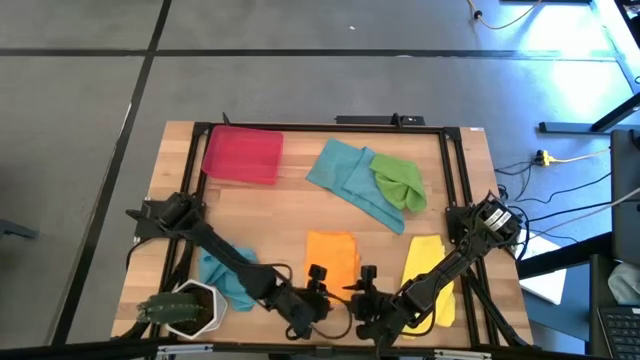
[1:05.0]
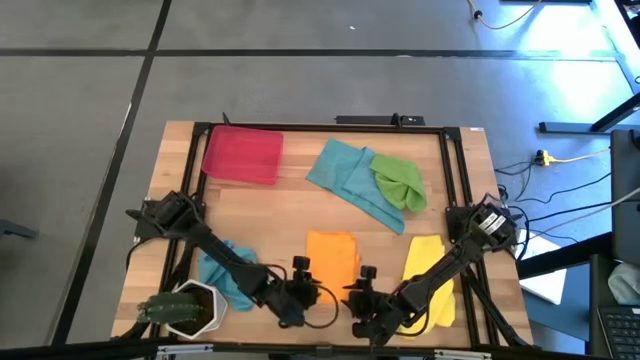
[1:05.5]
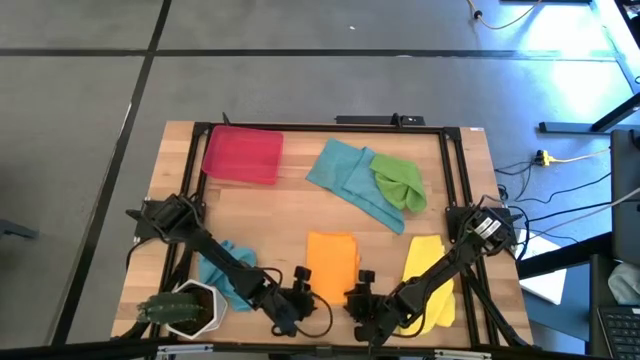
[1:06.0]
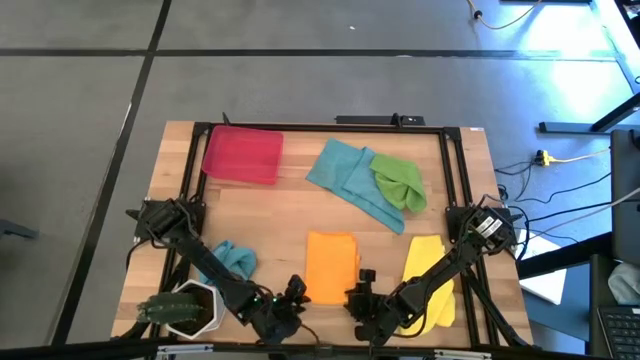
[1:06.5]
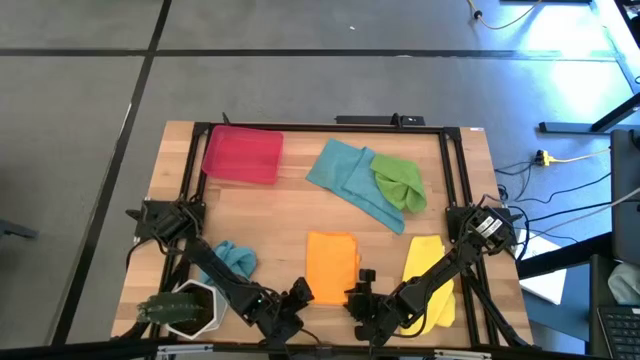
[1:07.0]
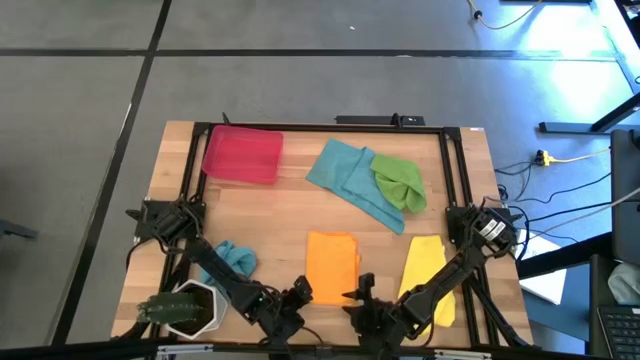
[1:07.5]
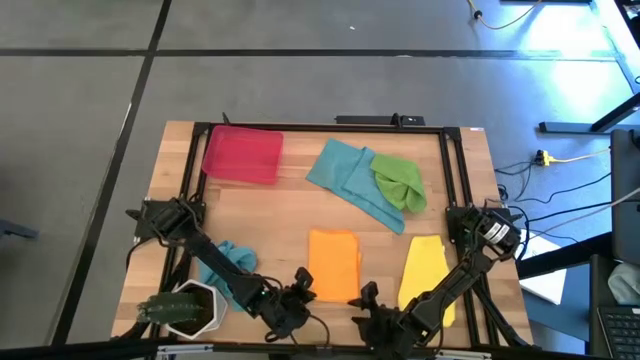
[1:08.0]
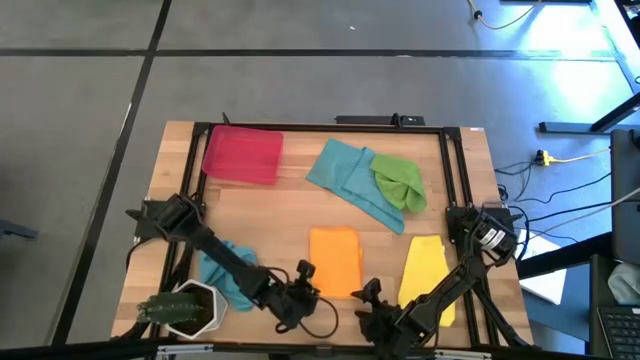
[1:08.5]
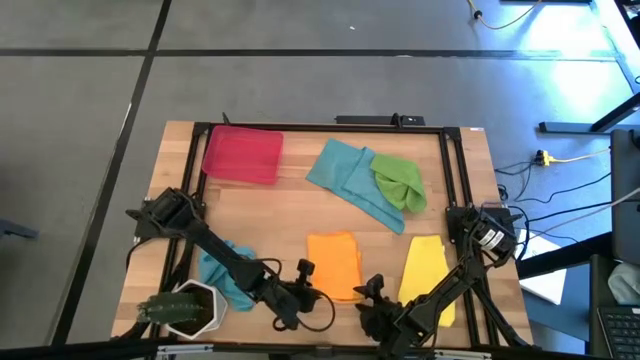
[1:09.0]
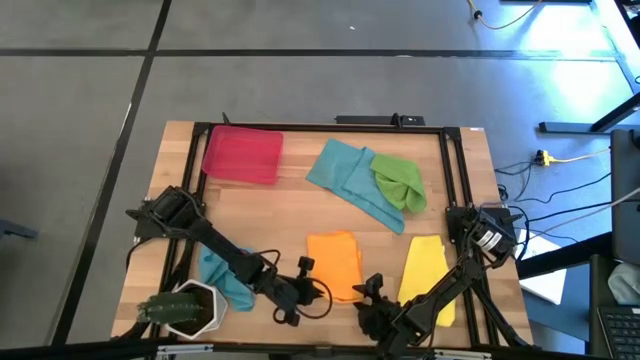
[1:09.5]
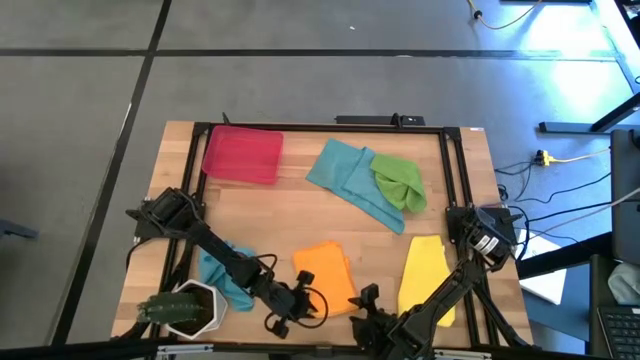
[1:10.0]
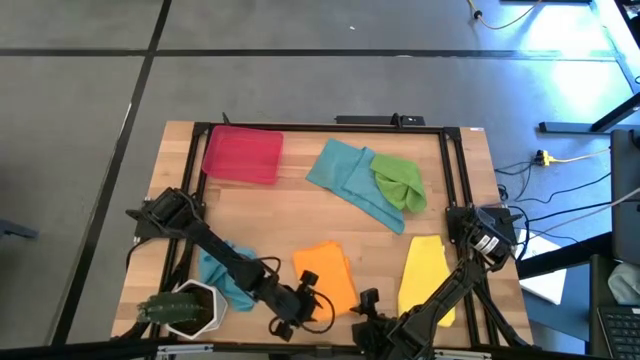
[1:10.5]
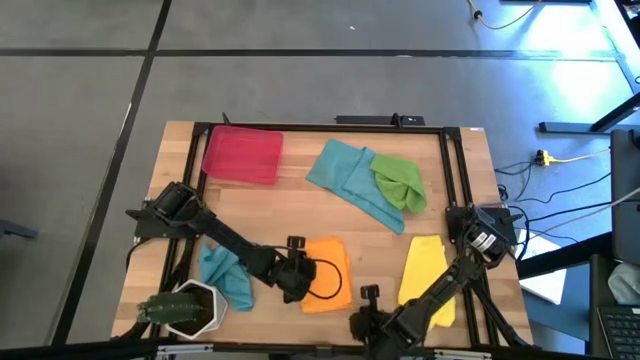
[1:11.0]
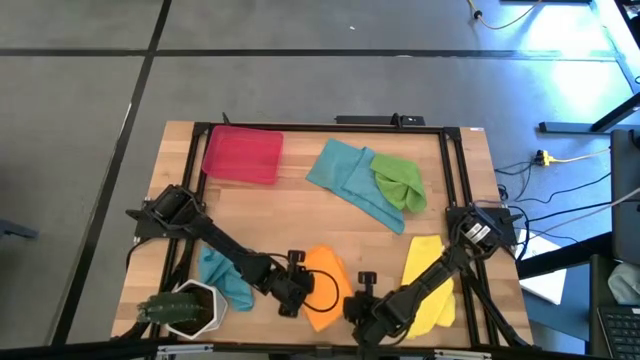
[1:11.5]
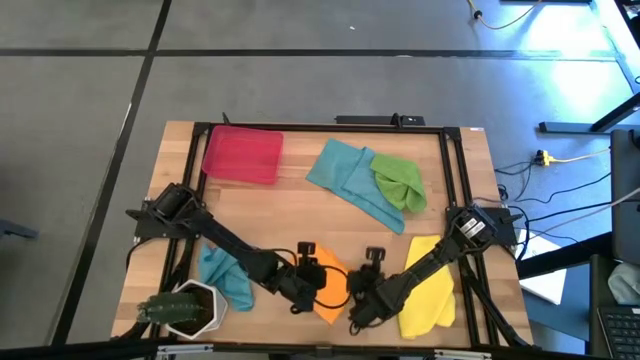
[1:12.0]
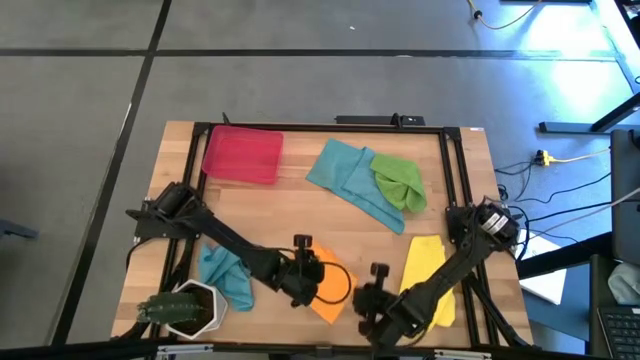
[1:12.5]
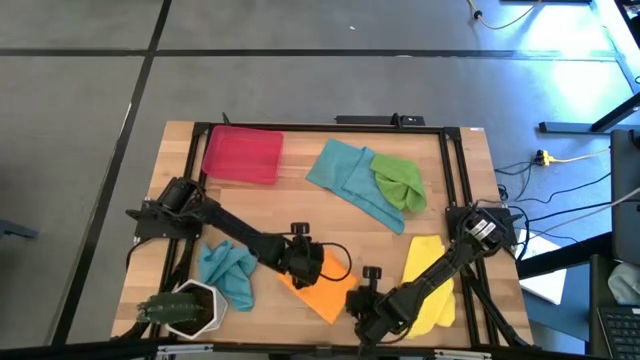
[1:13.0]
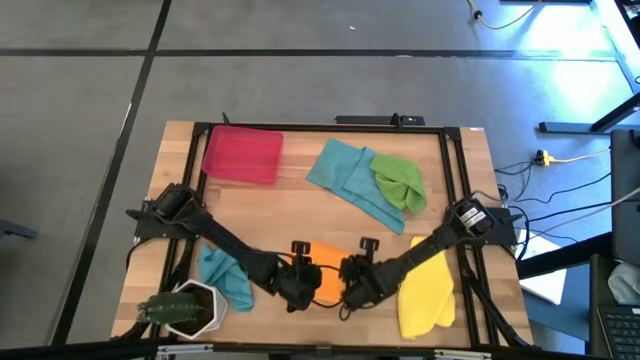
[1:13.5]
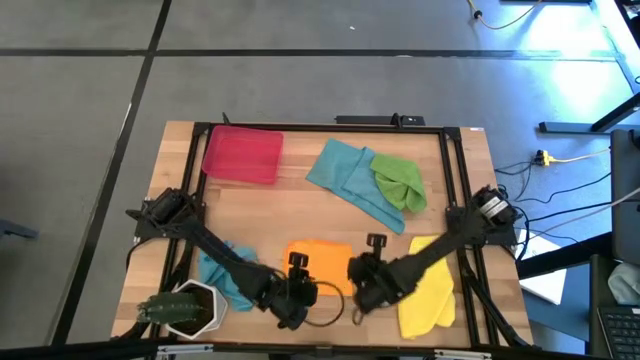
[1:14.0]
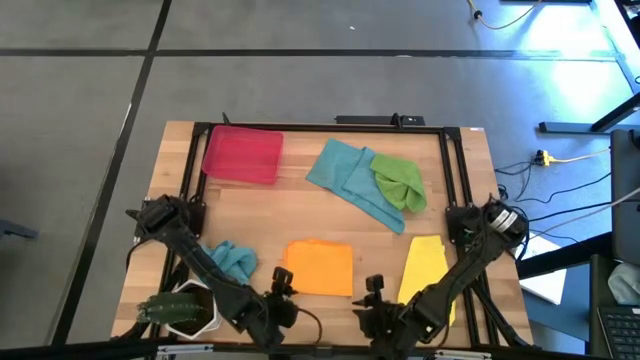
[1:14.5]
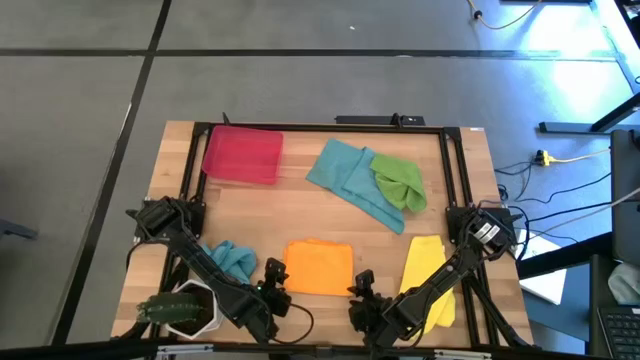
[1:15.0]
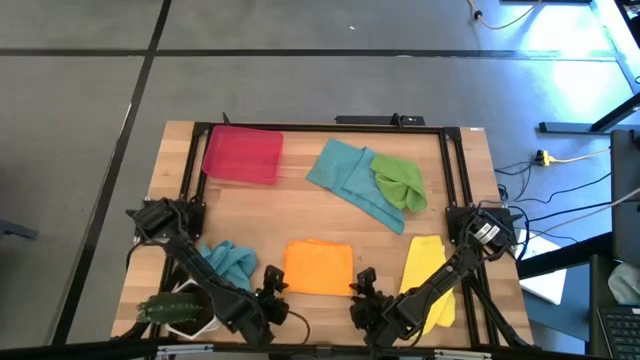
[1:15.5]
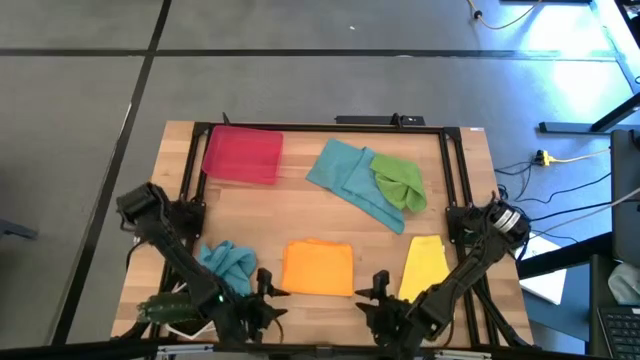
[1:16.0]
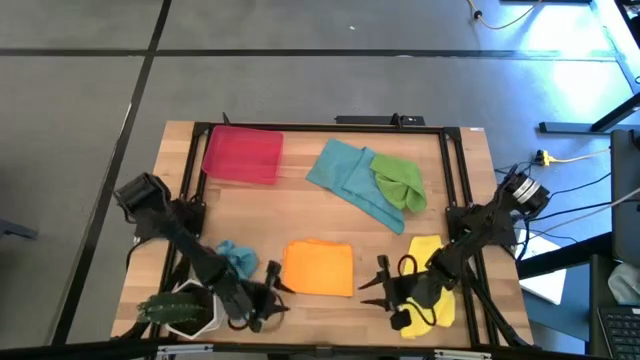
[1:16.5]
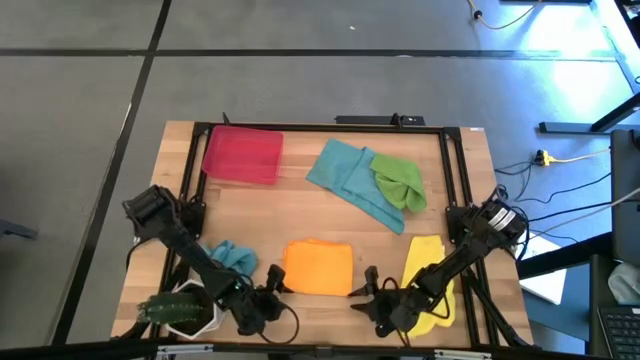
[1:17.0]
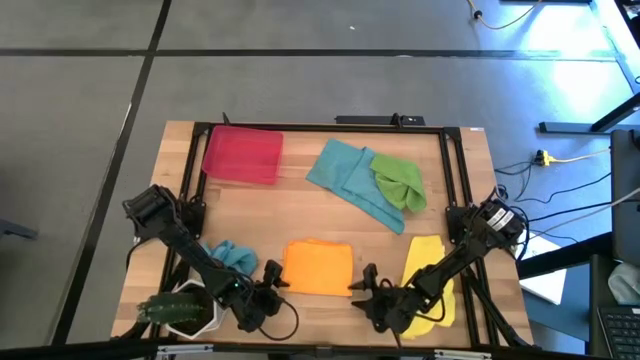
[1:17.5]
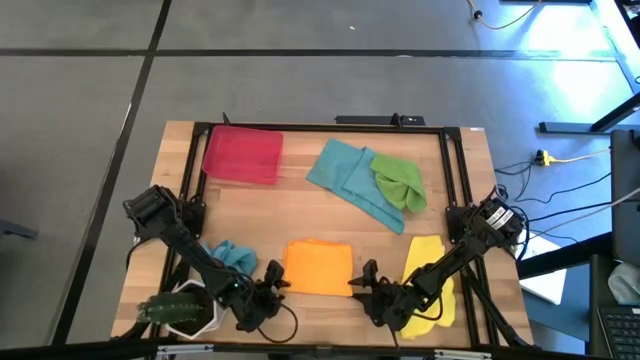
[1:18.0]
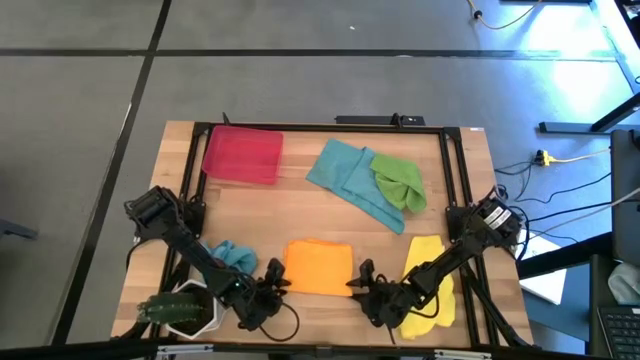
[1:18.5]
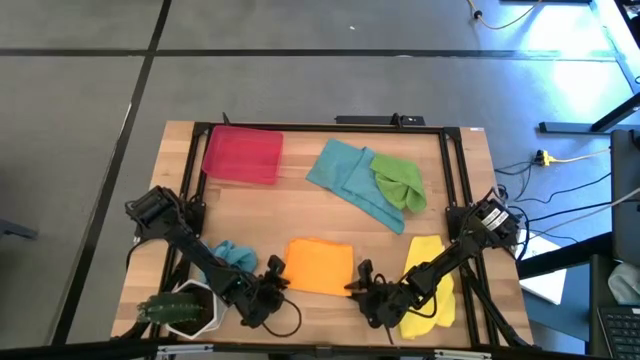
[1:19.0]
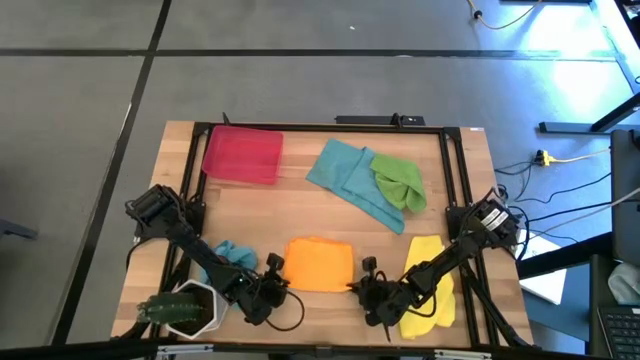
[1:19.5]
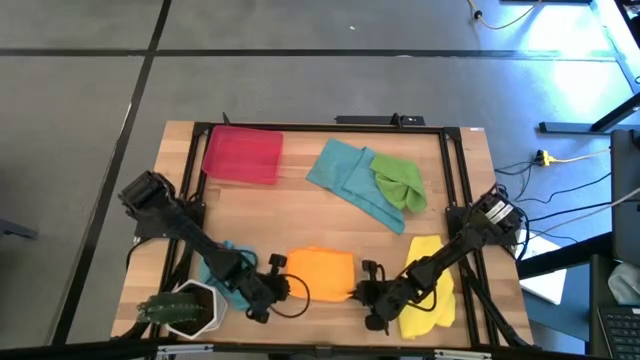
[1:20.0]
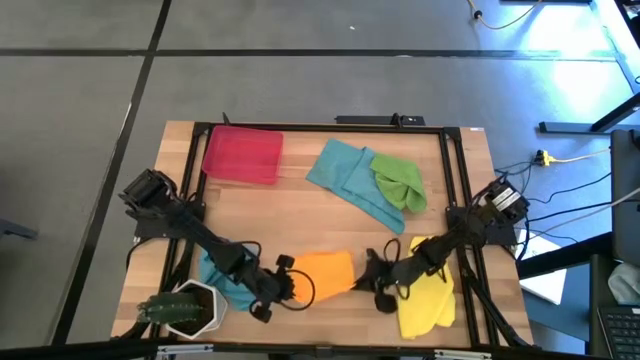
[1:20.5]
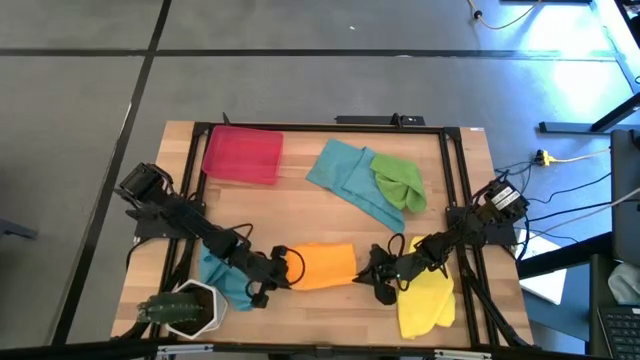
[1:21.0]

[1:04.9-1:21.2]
Task: Roll microfiber towels into tight, uniform cylinder then place into a basket
Roll the orange microfiber towel

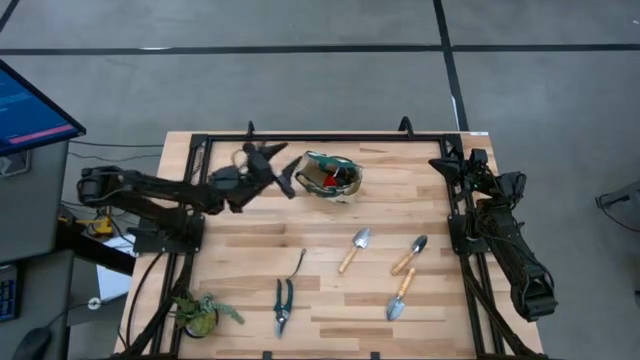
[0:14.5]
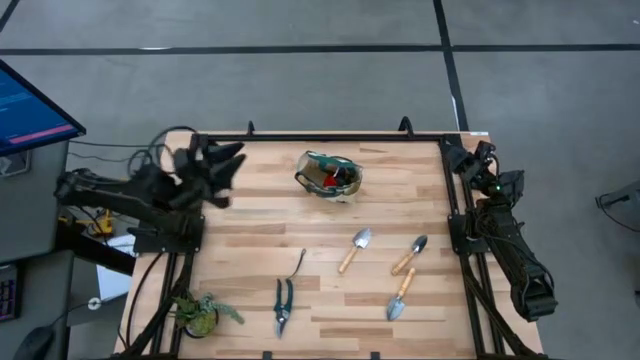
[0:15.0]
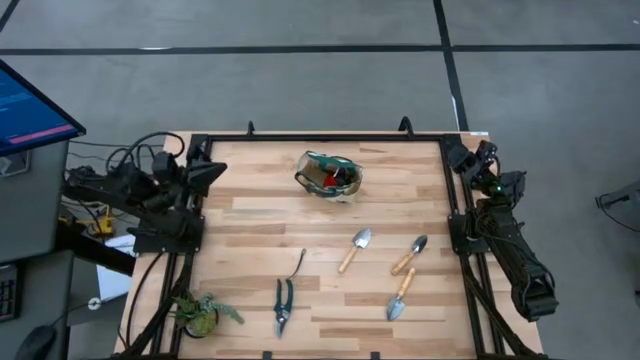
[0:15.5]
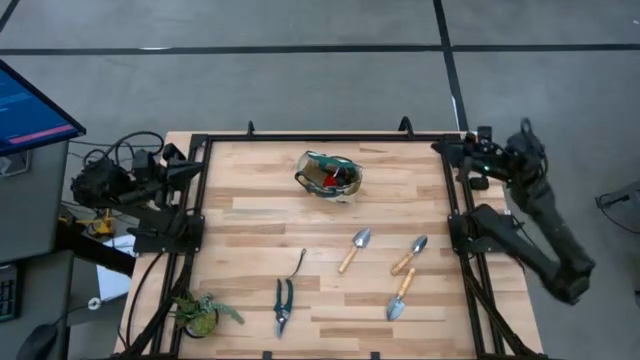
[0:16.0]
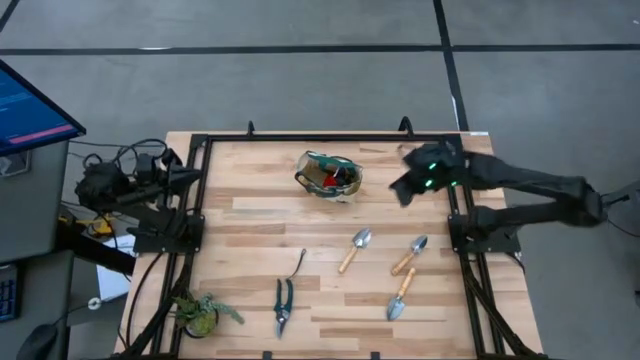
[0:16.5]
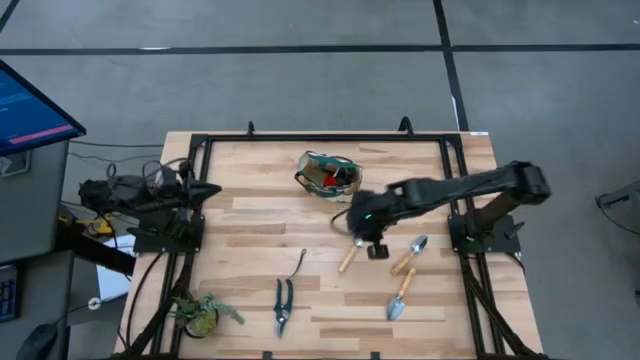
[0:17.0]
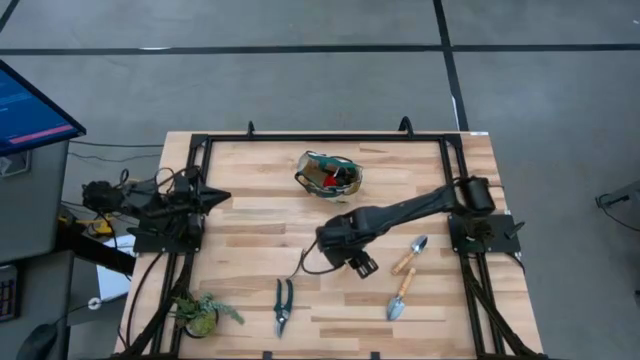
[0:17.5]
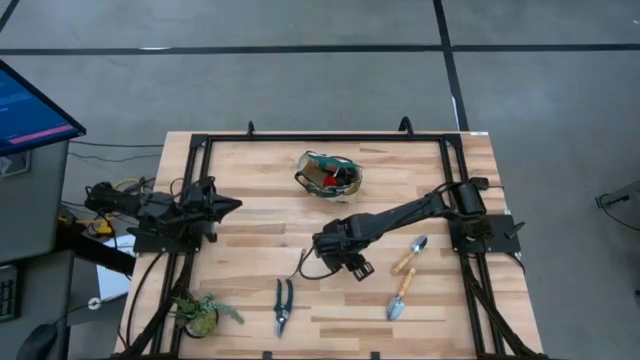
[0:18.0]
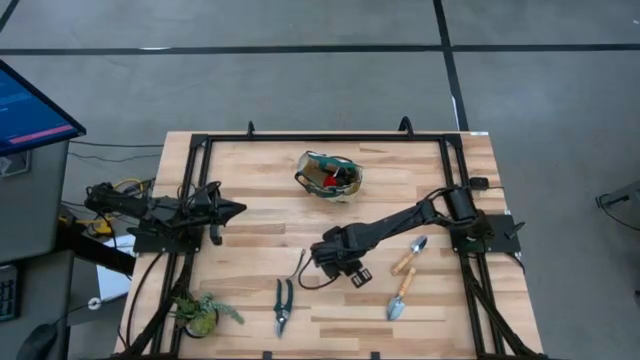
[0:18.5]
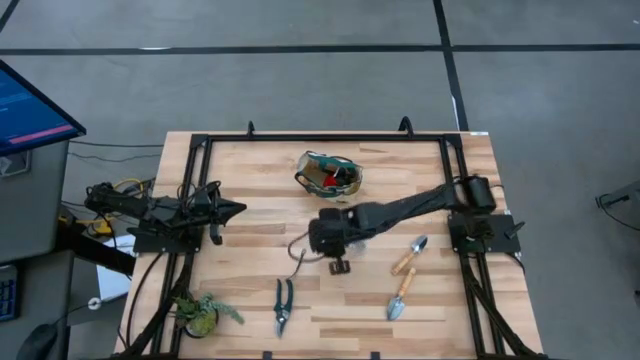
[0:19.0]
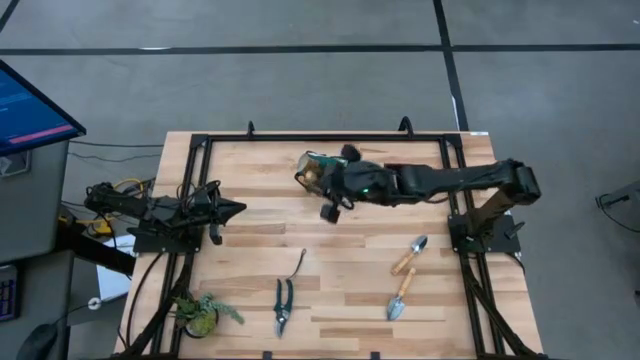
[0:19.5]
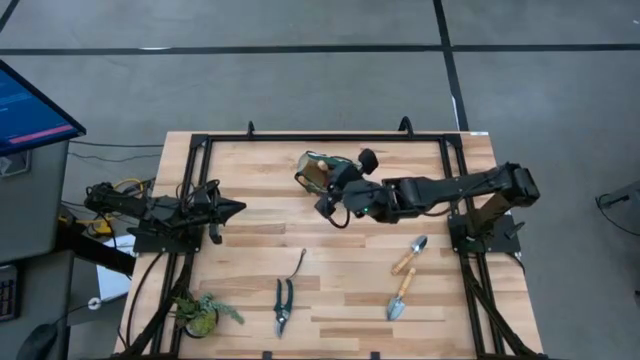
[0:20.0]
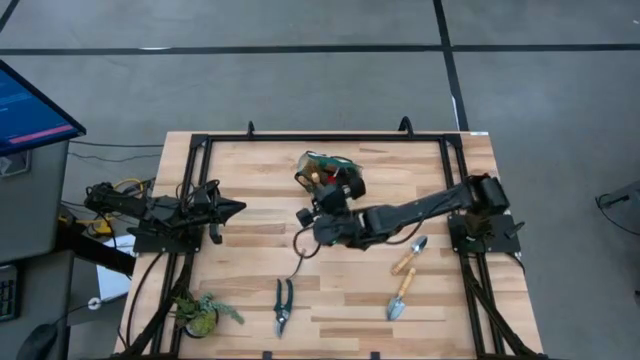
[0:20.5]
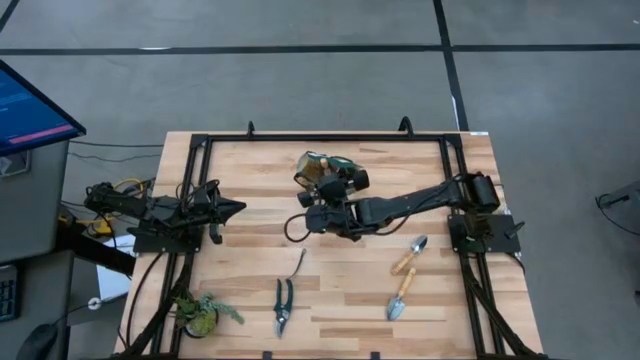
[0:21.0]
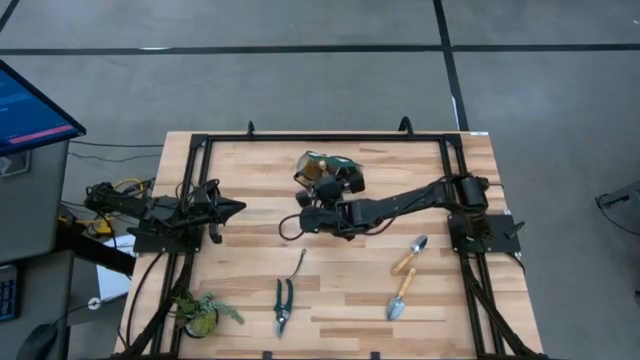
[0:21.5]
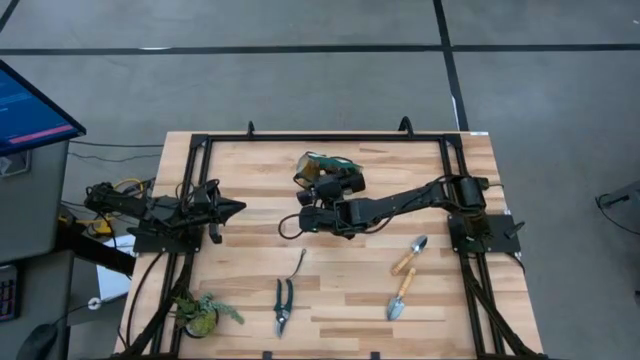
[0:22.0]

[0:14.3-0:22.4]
Task: Pick & Place Garden tools in Gardening bag
Put the top left brown trowel into the white gardening bag
